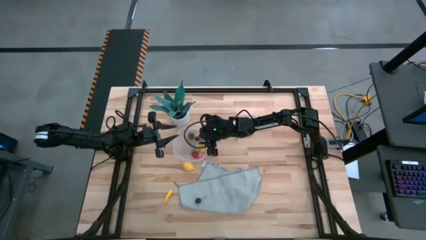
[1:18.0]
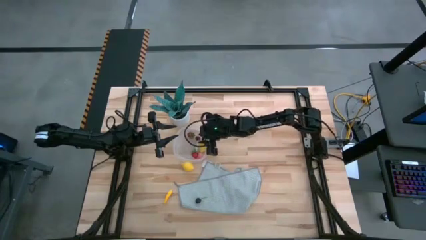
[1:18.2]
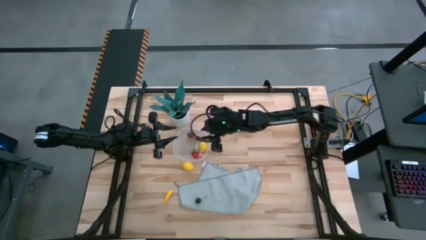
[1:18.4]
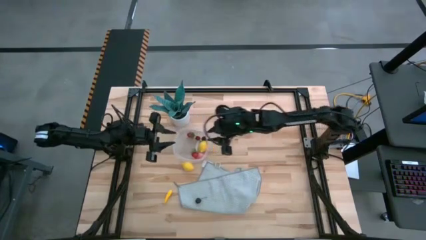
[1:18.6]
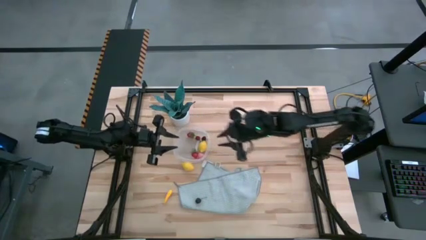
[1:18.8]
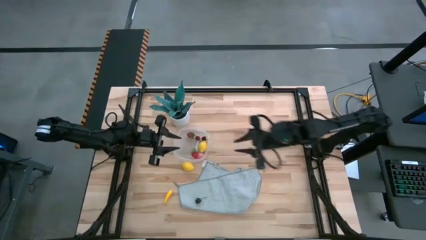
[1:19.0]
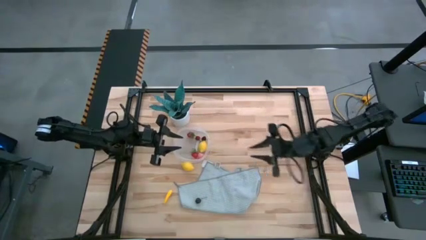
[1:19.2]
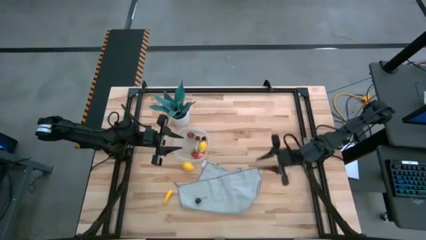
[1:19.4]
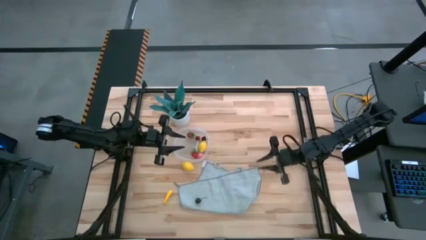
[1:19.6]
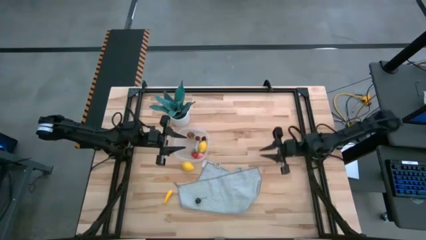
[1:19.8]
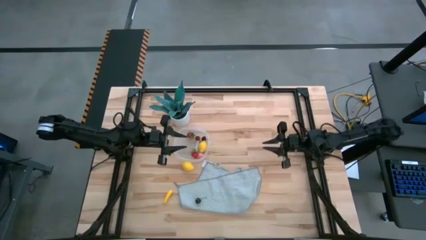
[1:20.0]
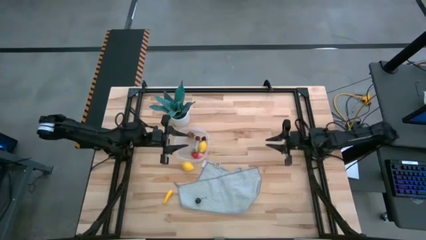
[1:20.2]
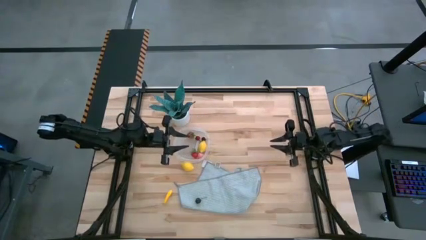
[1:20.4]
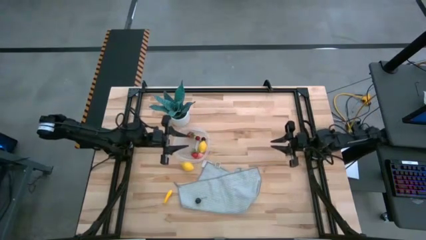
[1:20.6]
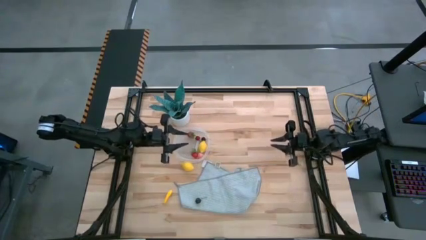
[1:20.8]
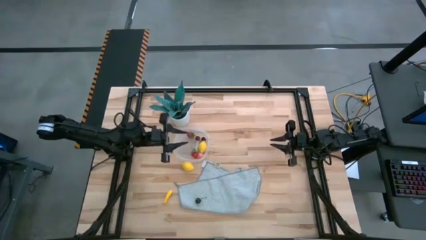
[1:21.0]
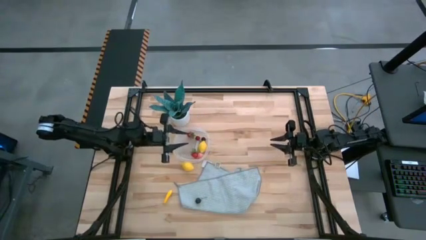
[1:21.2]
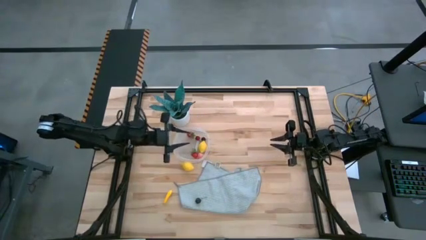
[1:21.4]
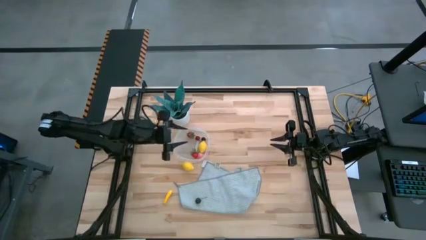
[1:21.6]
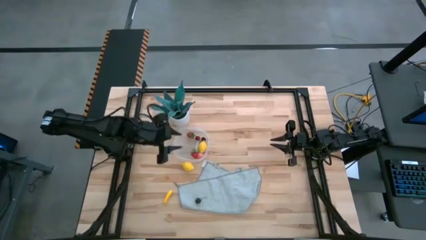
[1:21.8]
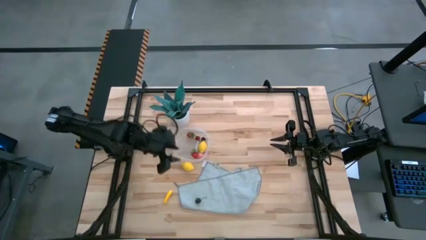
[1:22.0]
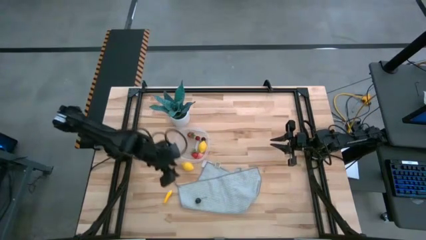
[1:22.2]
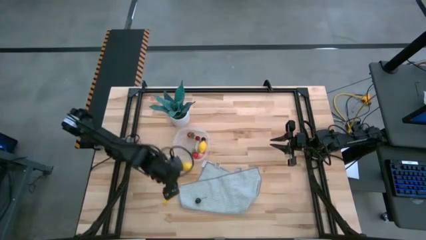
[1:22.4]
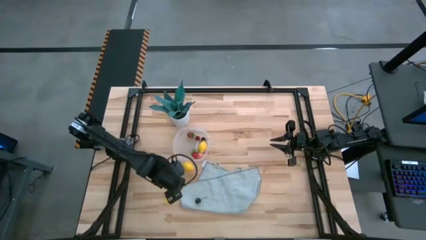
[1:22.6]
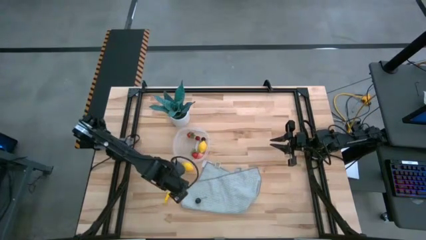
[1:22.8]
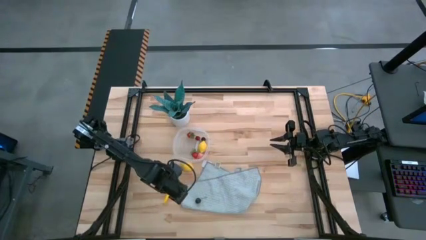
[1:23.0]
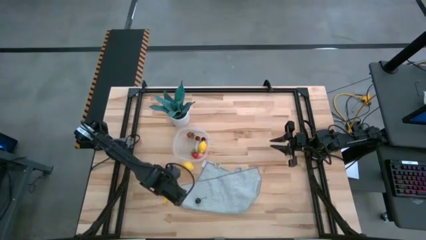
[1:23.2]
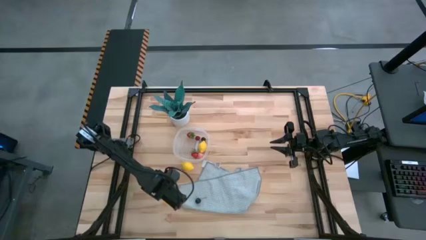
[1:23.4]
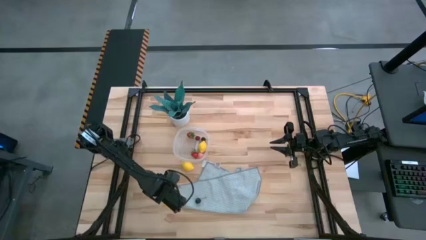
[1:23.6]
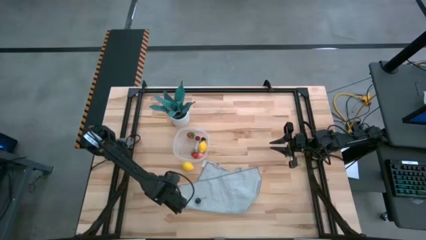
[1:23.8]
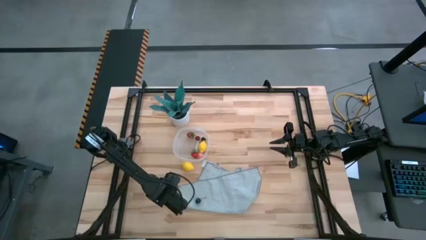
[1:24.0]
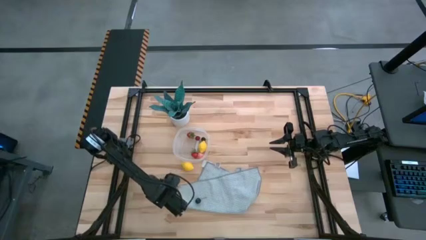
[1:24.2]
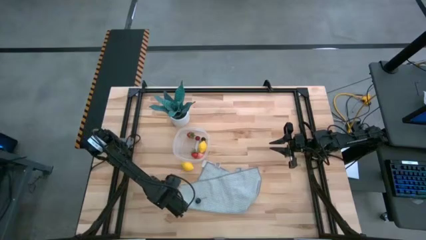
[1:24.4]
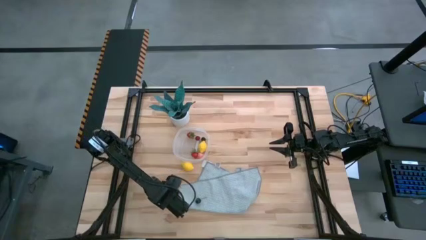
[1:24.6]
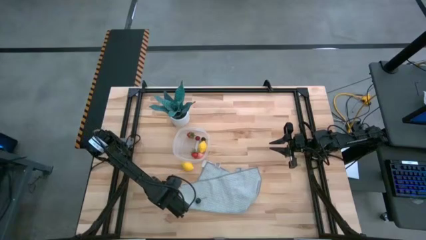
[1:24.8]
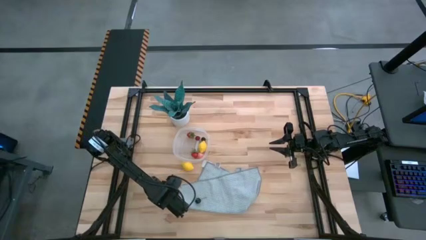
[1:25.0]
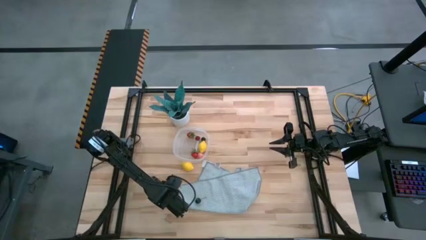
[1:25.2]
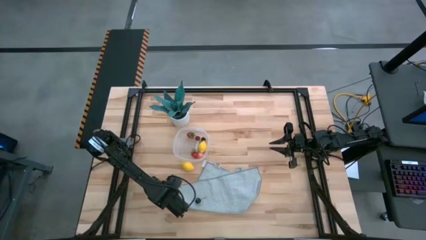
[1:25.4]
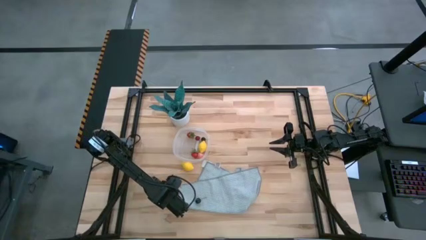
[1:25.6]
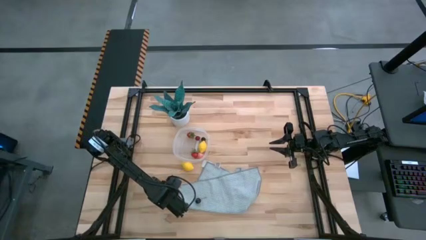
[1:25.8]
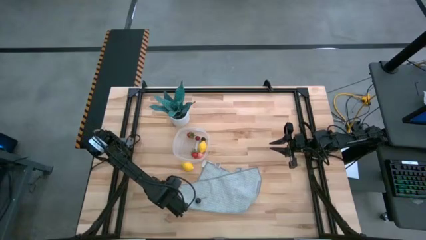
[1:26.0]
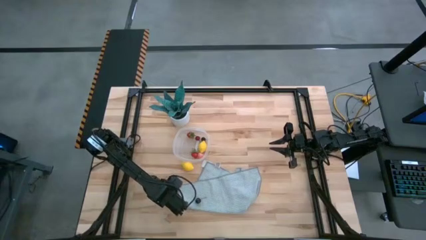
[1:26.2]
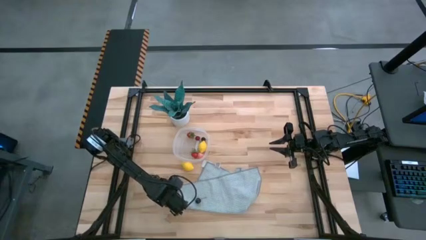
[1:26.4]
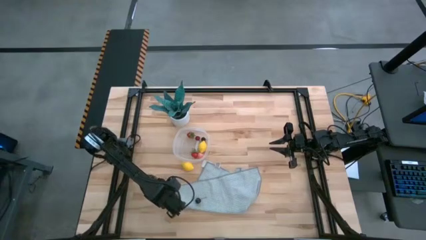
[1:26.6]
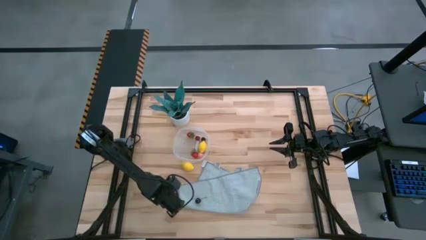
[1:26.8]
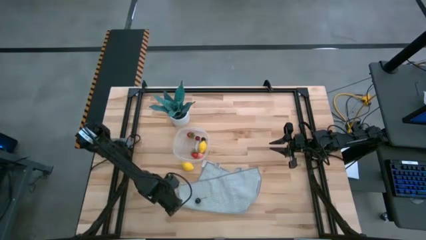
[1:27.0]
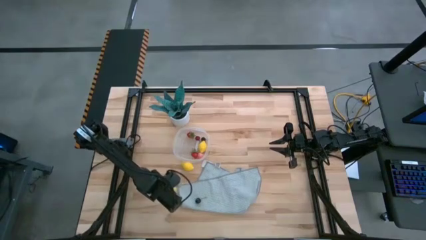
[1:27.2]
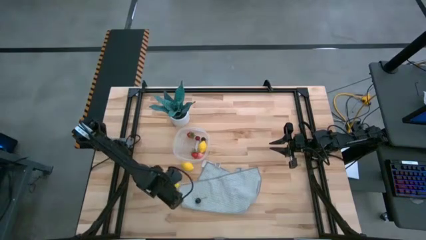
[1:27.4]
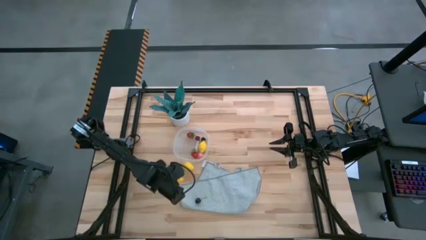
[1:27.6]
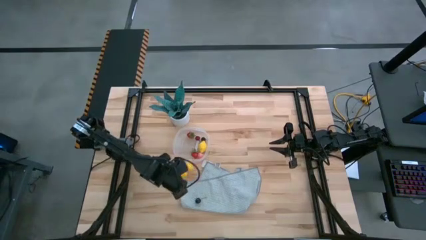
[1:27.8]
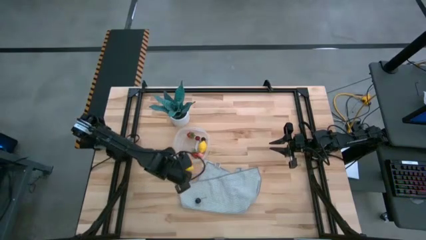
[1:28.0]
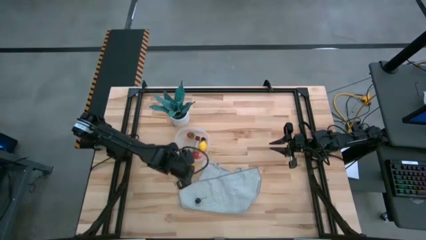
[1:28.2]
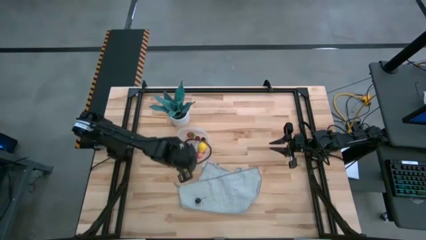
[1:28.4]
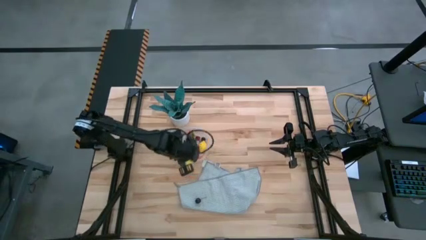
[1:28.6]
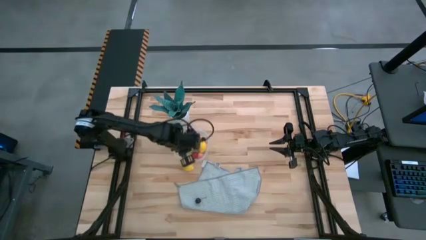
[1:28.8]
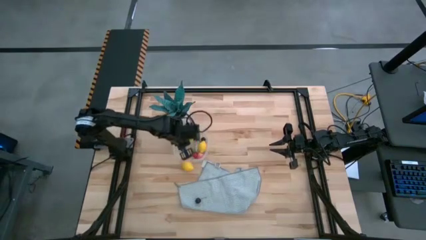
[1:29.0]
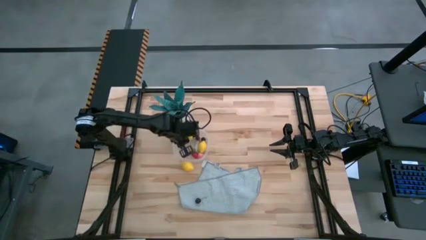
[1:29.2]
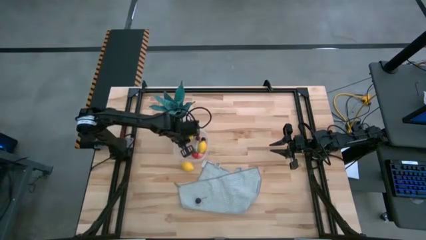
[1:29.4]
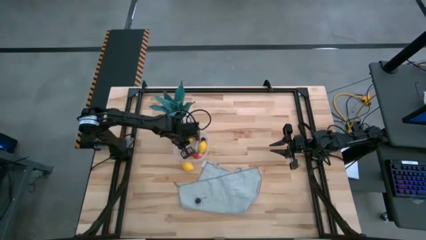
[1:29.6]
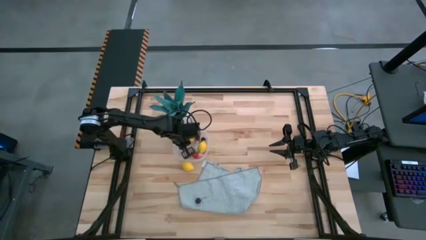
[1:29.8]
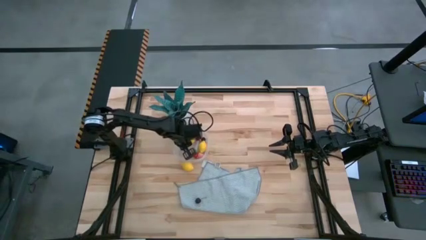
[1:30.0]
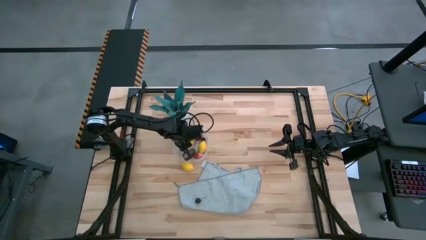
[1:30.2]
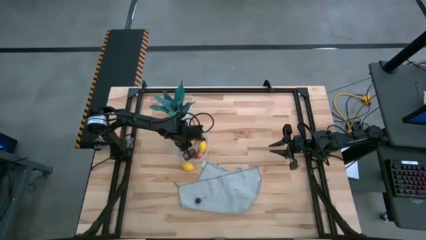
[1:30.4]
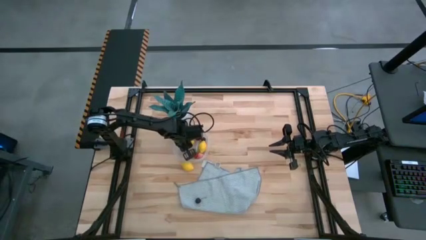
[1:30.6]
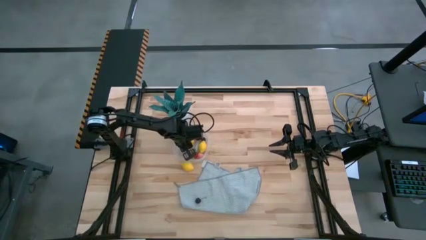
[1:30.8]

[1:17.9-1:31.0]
Task: Pick and placing Produce into tupperware
Put the yellow corn into the container

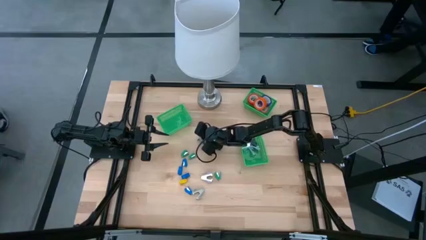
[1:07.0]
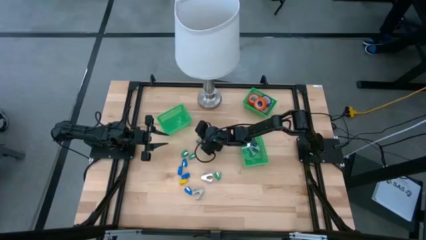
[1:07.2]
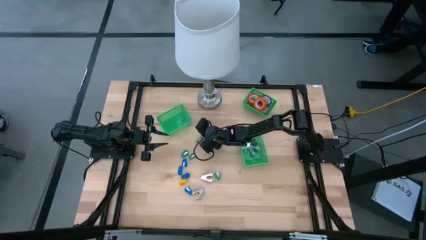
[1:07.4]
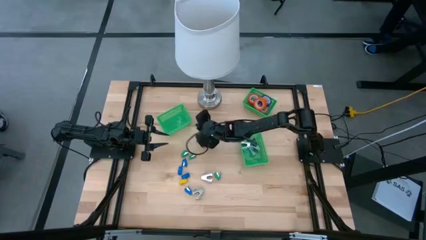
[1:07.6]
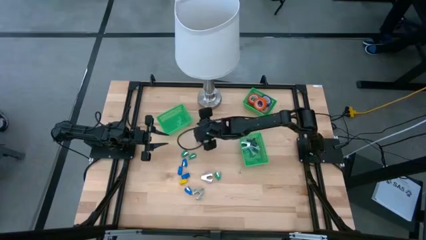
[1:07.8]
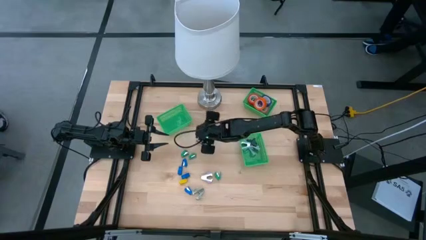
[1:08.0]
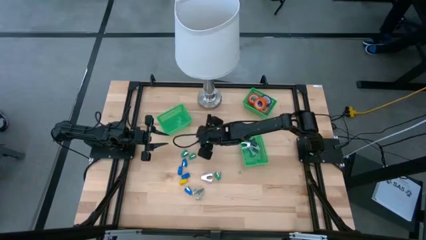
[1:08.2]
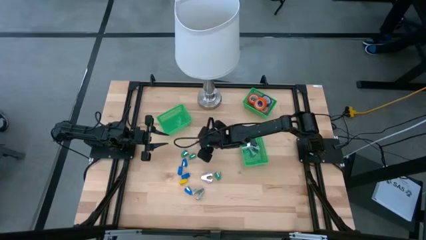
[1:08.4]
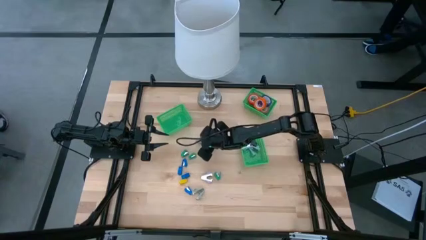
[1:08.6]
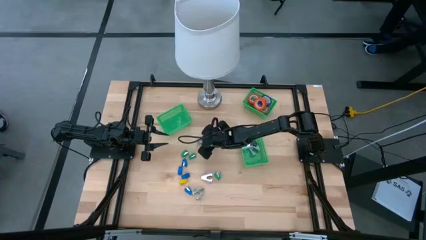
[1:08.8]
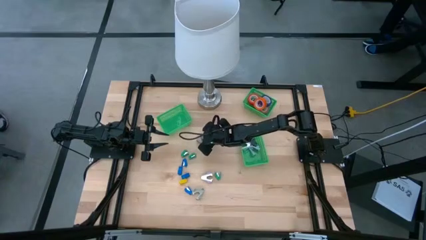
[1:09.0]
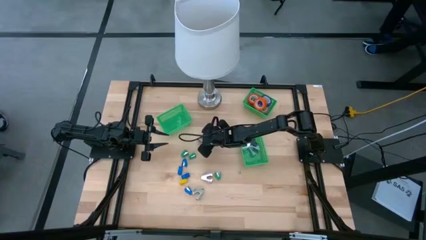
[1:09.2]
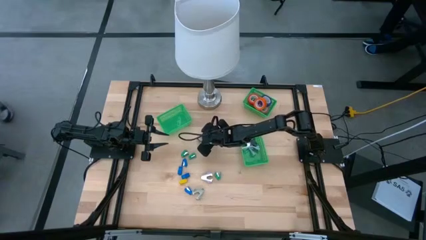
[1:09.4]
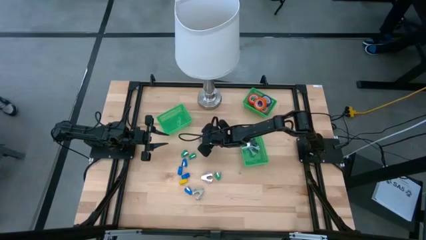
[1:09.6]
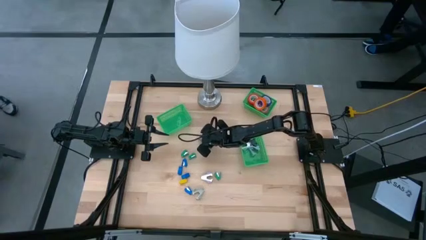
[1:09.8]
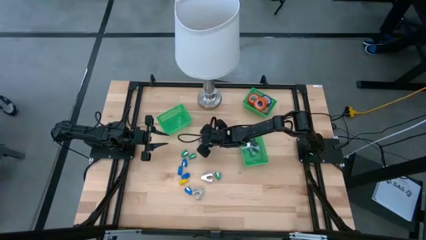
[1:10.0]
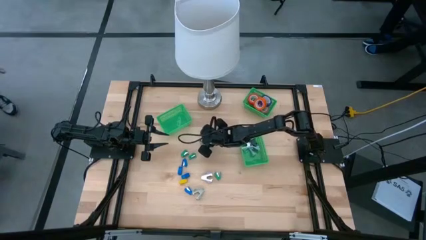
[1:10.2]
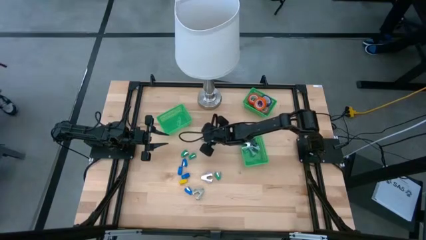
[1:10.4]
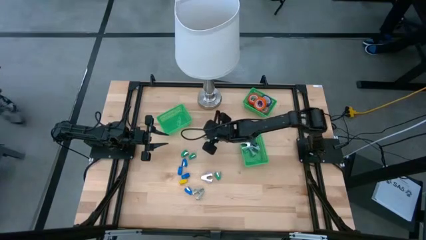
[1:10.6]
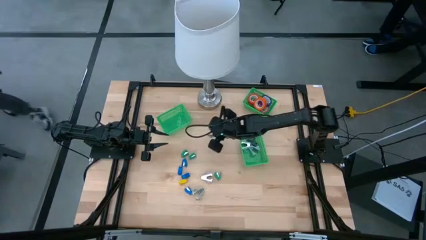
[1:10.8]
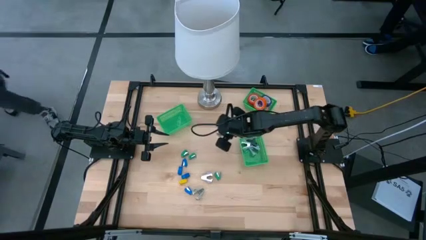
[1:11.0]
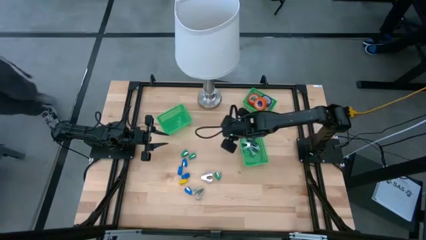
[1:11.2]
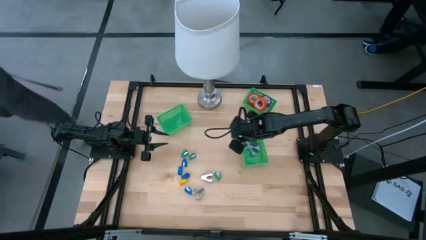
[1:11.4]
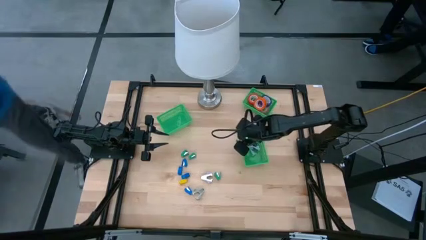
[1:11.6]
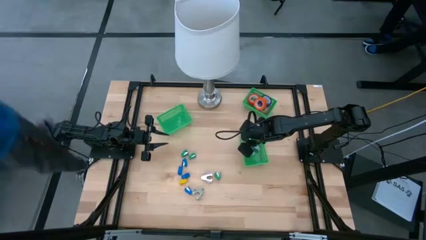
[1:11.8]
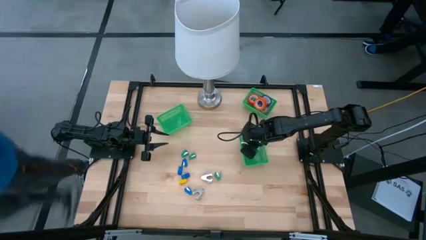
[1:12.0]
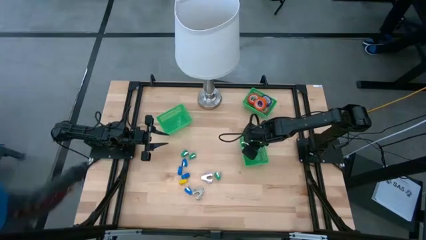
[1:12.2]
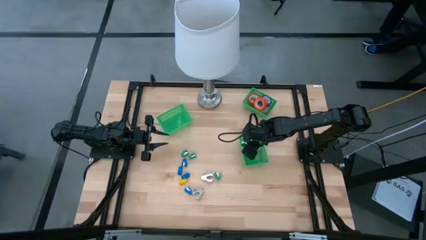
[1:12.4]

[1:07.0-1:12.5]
Task: Pick and place Stapler, Stapler remover, tape
Put the gray staple remover into the bottom right green bin
